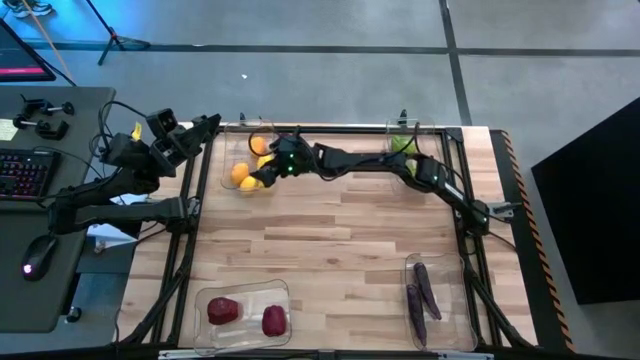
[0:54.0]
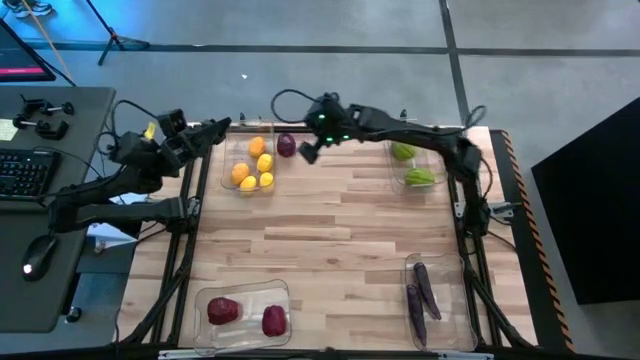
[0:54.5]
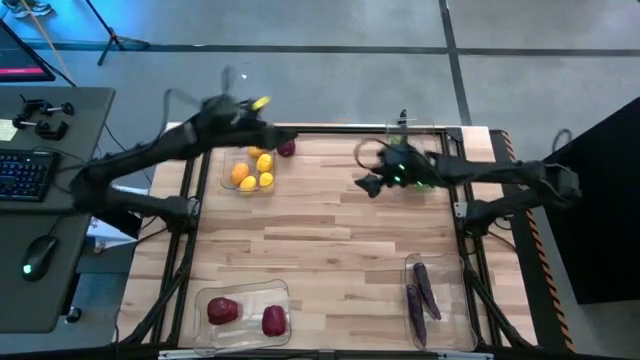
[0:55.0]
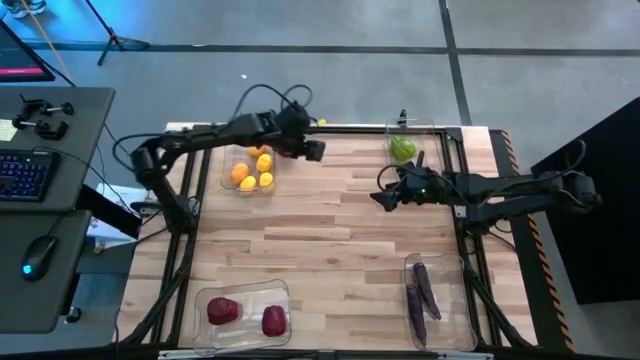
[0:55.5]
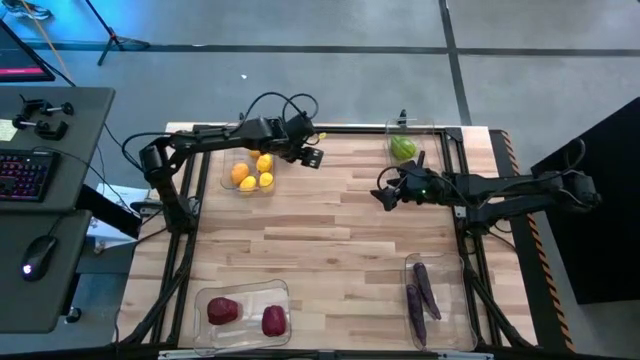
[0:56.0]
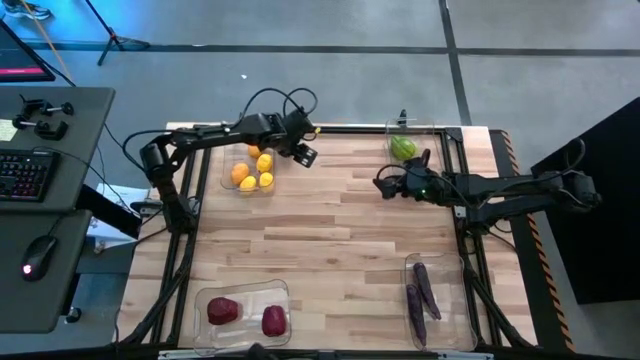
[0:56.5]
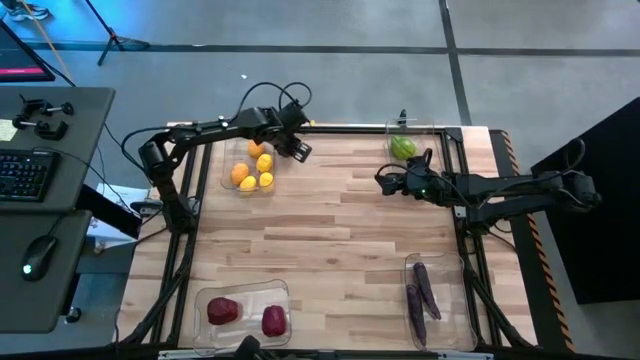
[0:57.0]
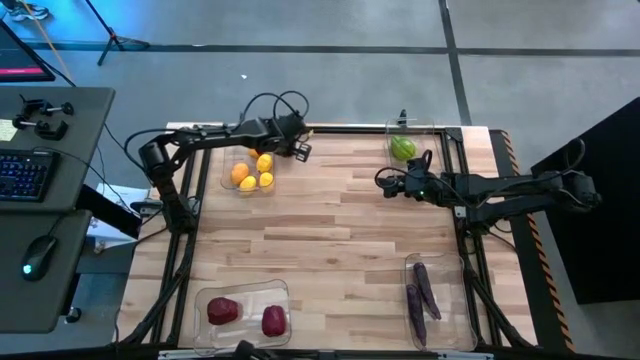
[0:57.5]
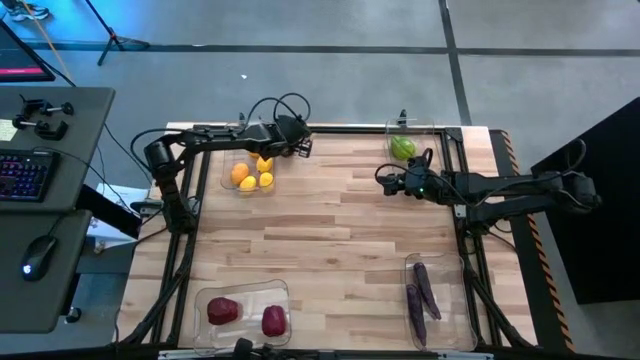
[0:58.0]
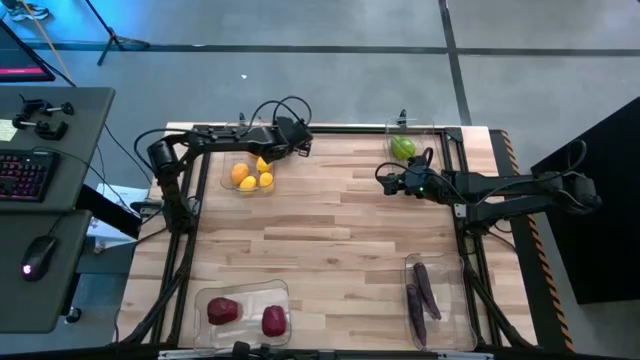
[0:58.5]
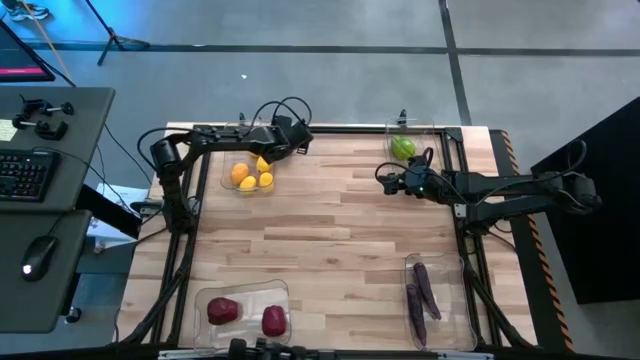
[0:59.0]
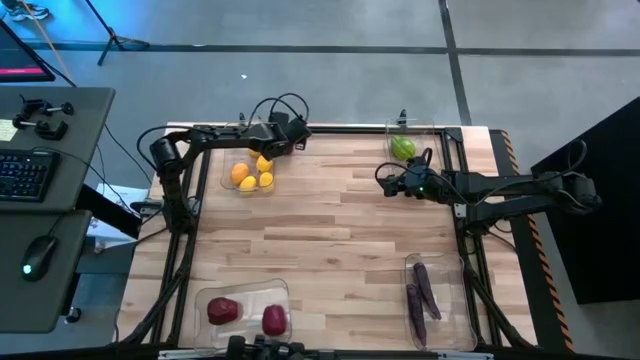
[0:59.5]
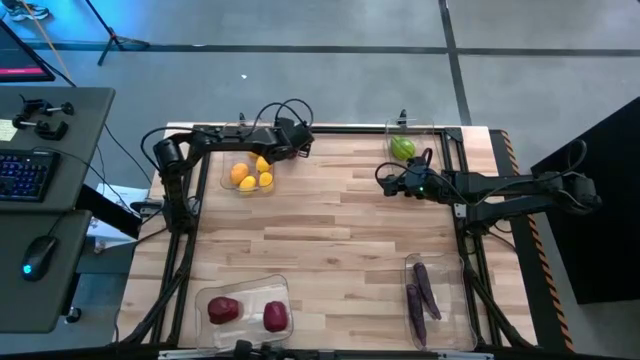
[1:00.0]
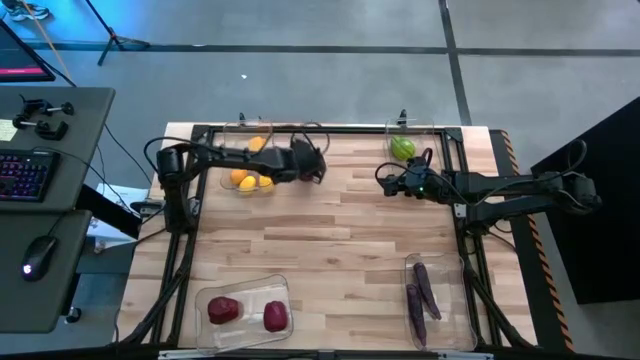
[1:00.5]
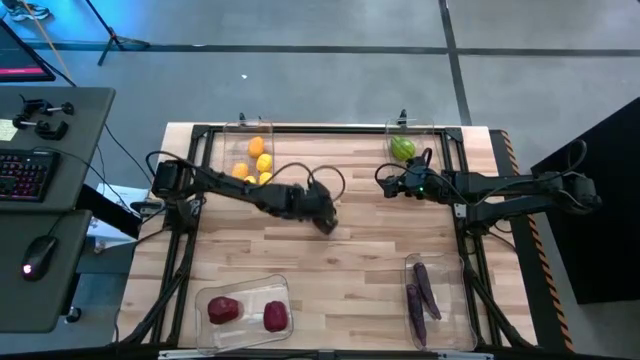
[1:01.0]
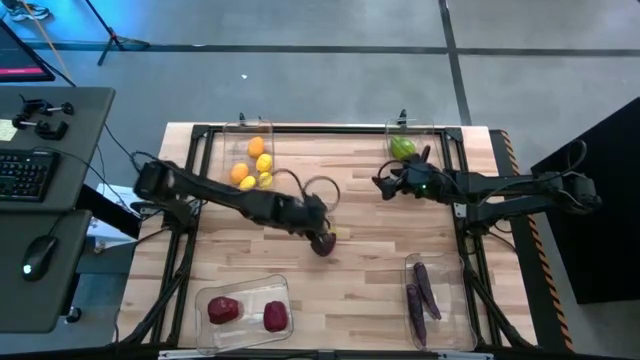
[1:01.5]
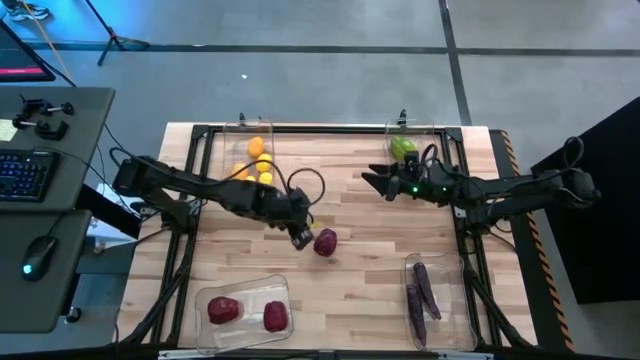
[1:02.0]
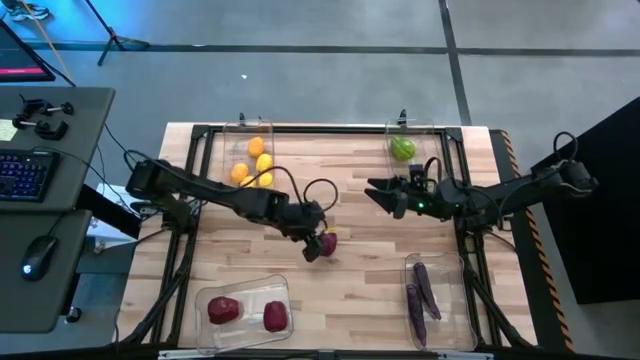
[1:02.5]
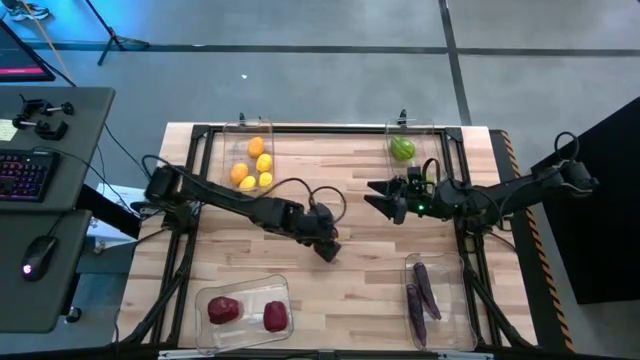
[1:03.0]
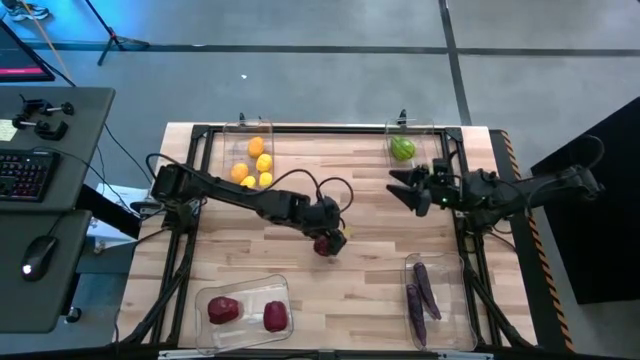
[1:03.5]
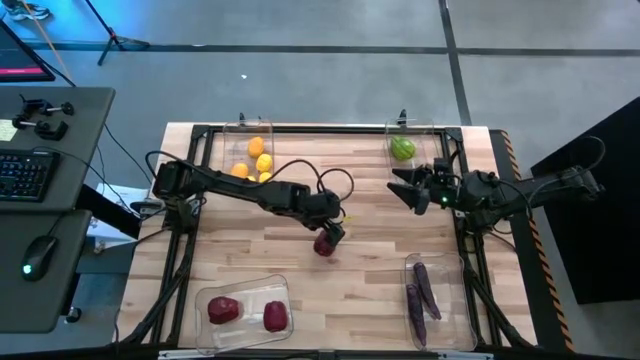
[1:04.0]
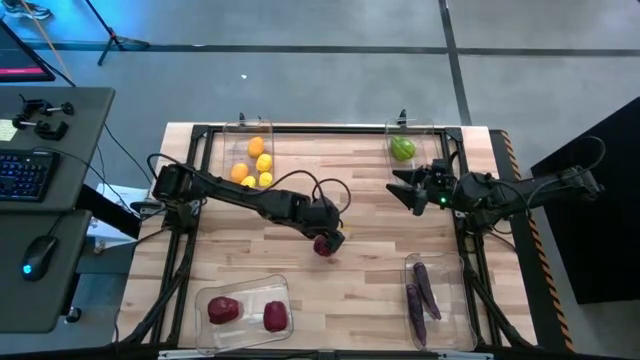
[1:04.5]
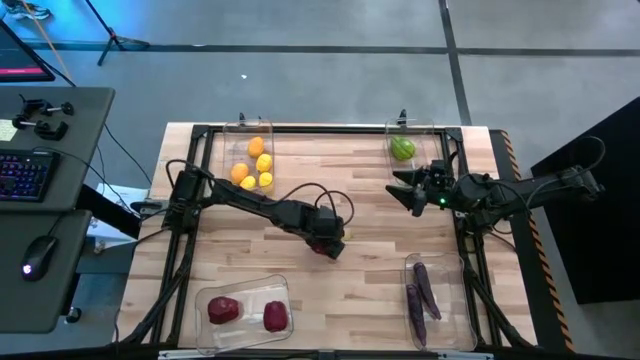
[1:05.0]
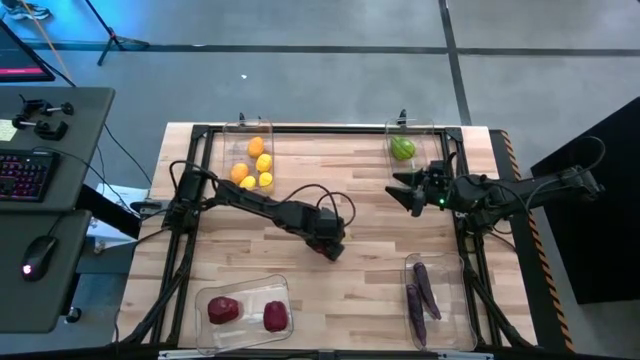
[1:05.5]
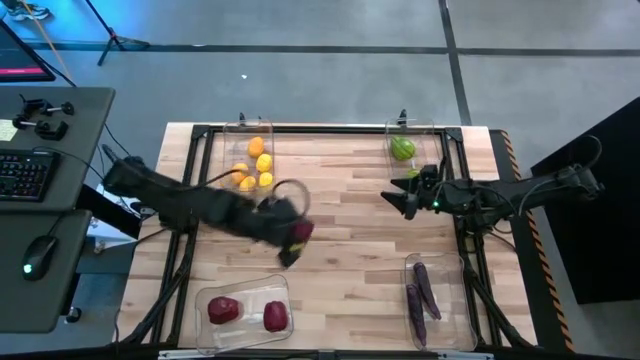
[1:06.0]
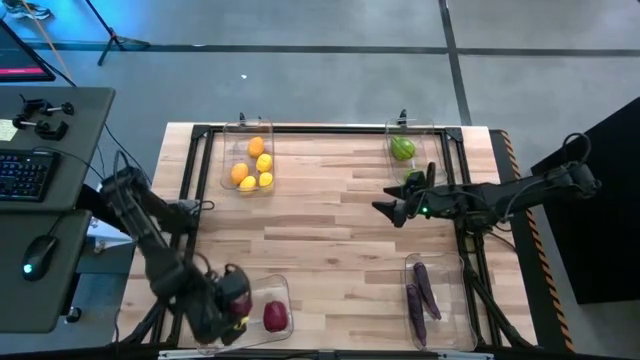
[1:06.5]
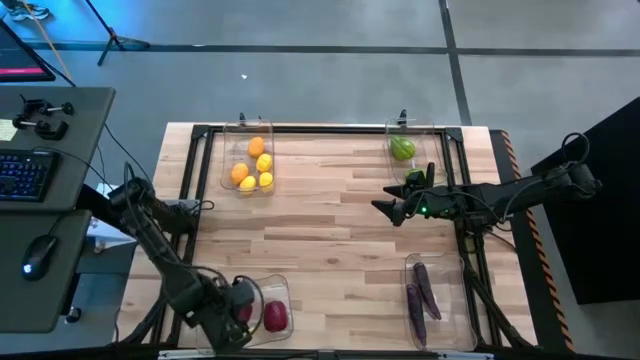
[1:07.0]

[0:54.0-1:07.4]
Task: Sort produce into baskets
Put the red apple into the bottom left transparent bin

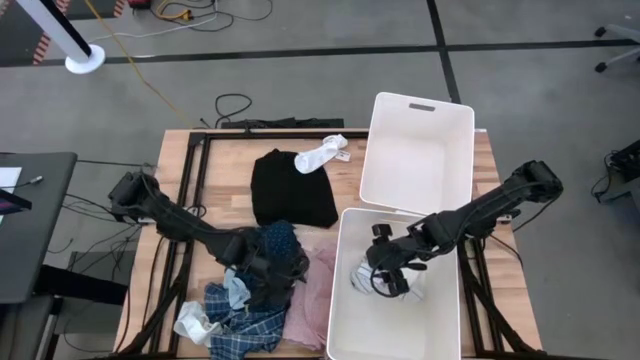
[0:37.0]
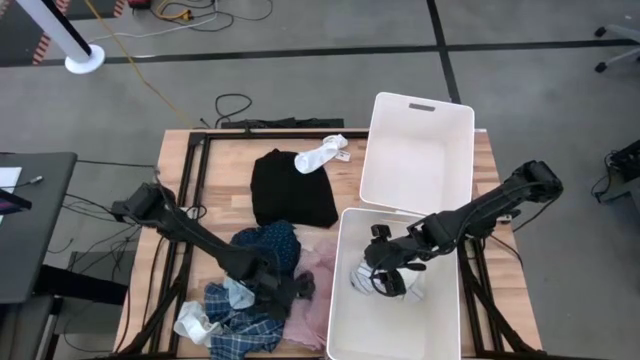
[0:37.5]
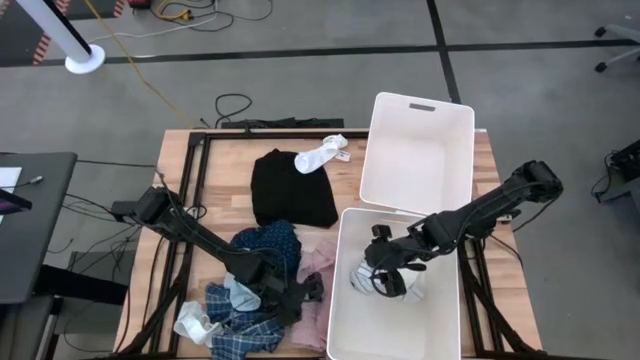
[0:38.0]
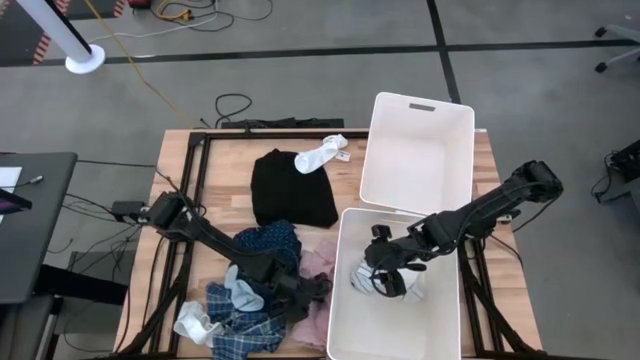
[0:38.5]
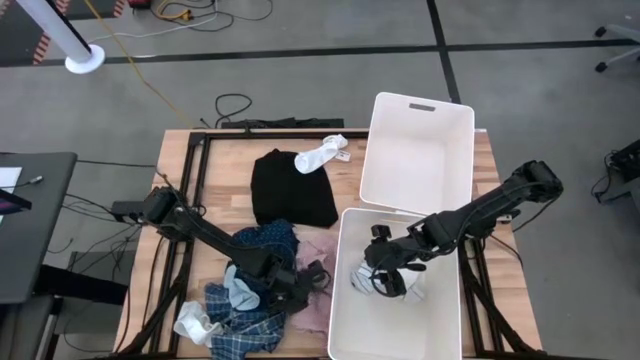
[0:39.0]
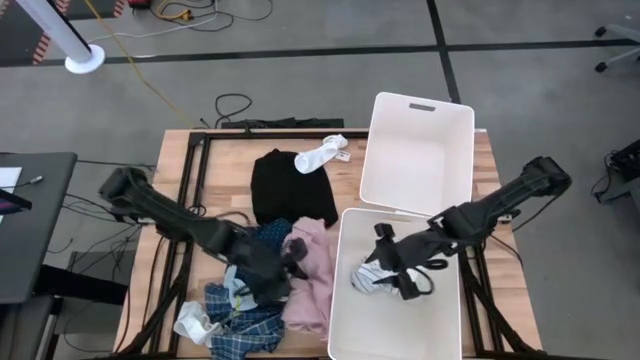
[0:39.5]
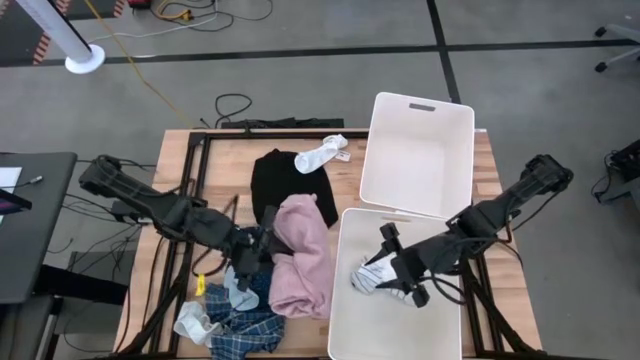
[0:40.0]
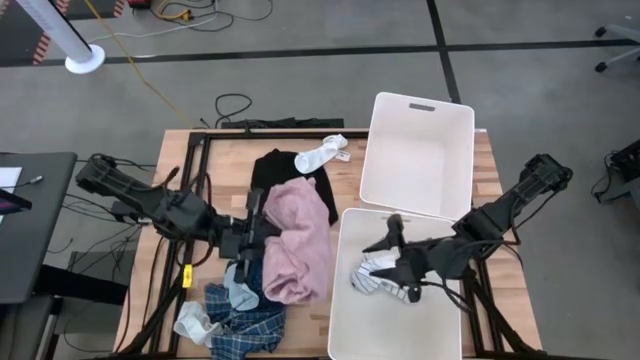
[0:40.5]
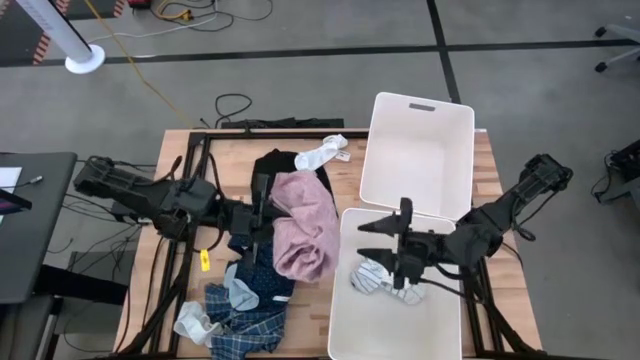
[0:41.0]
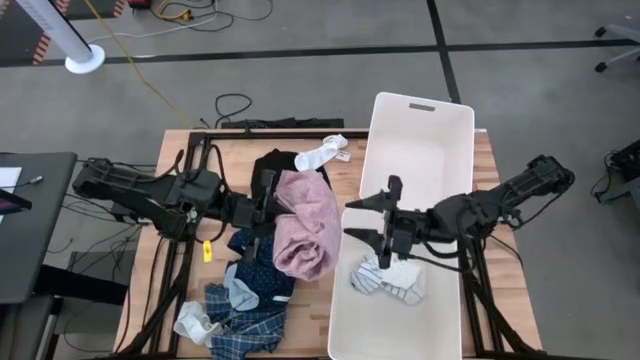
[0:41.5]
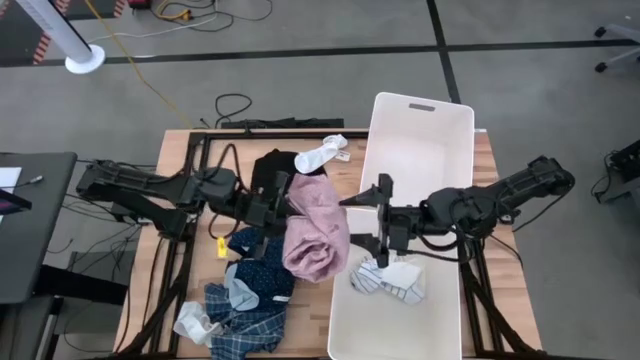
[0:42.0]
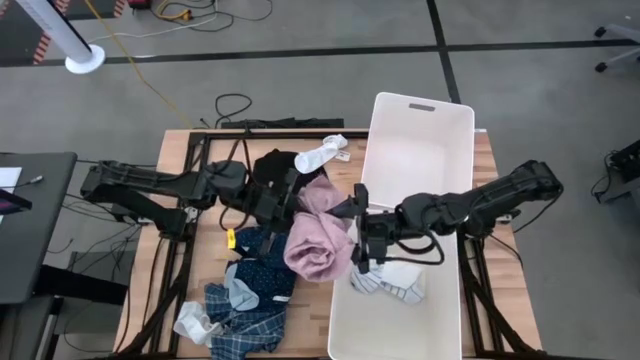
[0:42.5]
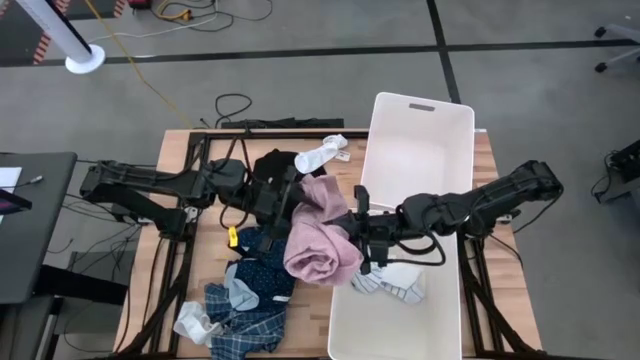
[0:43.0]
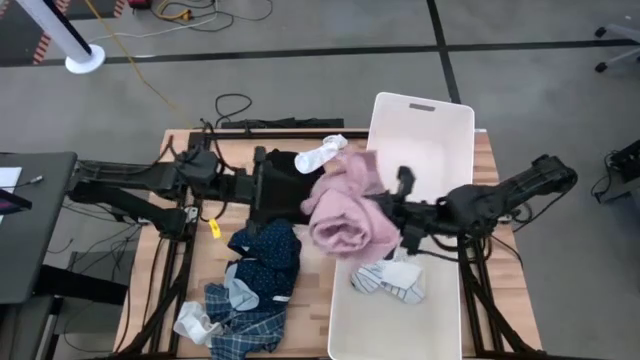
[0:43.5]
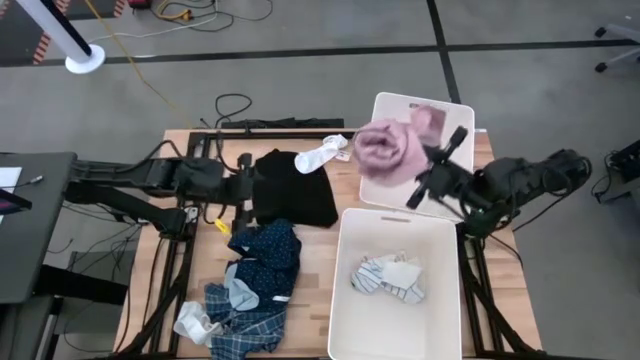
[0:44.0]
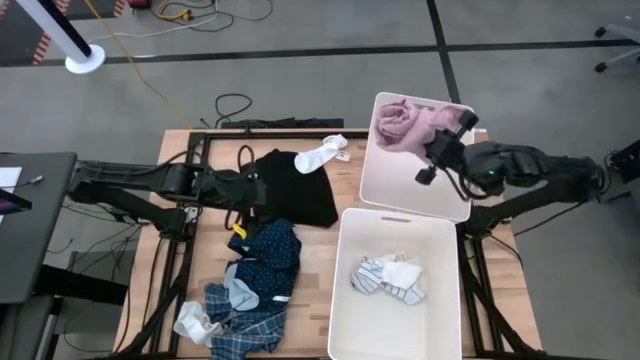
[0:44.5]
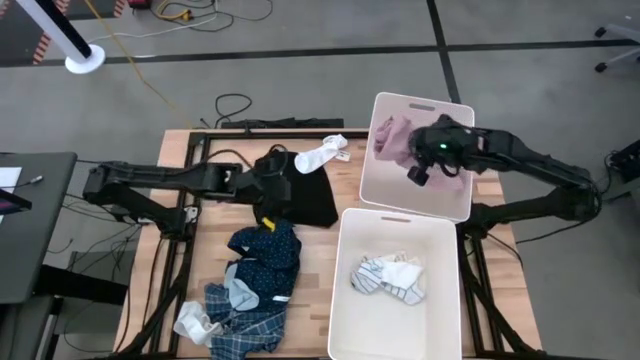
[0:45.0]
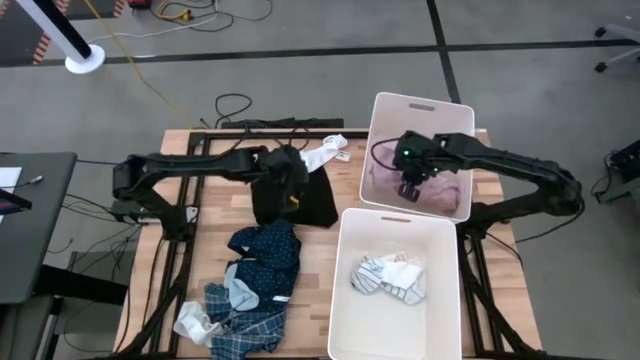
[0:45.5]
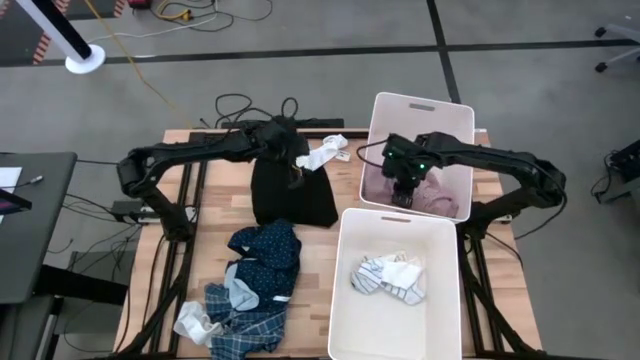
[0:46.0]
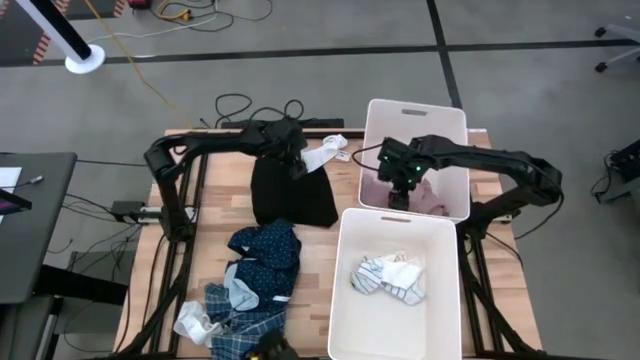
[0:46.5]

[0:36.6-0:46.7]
Task: Sort clothes
Put the pink polo into the top laundry bin
